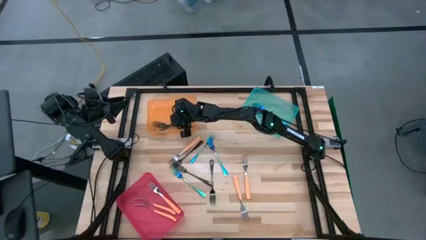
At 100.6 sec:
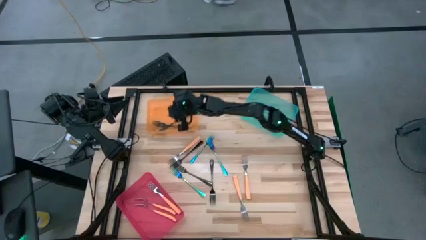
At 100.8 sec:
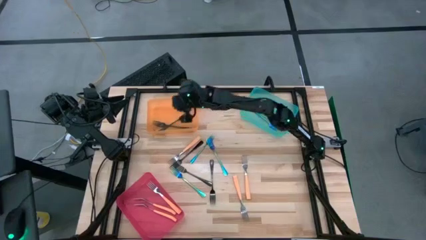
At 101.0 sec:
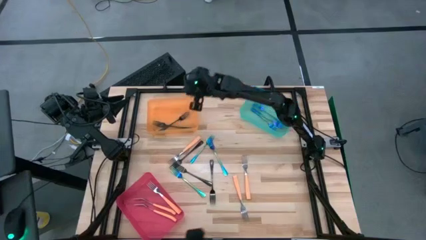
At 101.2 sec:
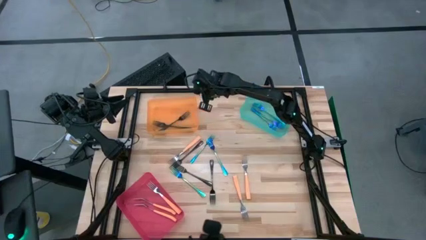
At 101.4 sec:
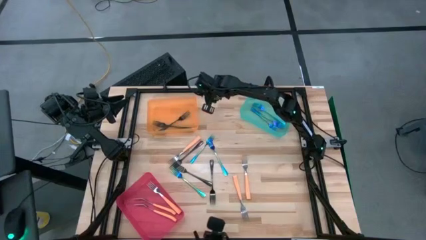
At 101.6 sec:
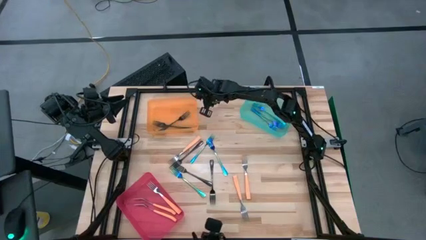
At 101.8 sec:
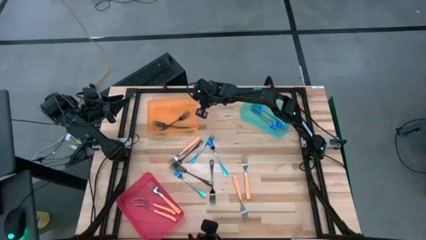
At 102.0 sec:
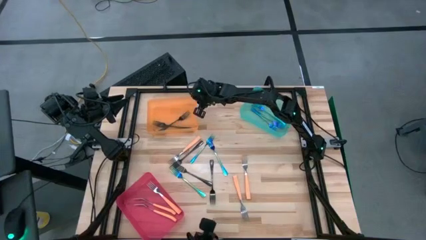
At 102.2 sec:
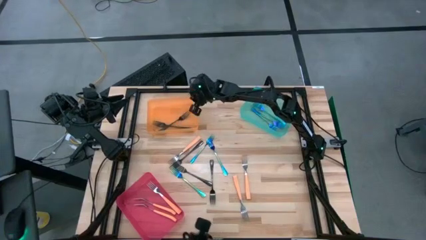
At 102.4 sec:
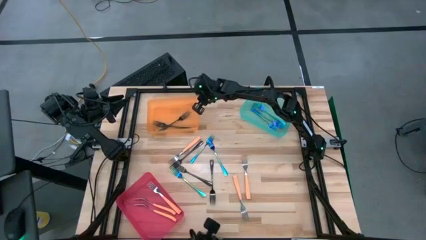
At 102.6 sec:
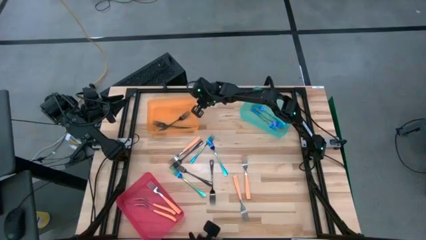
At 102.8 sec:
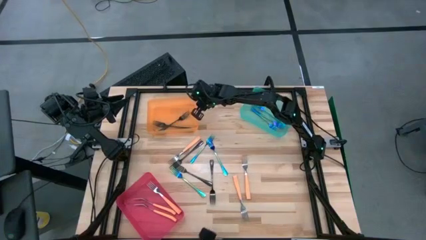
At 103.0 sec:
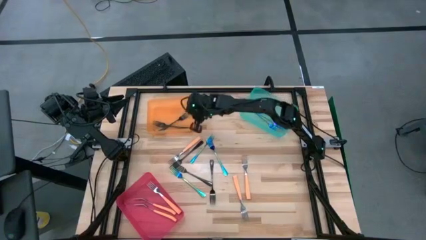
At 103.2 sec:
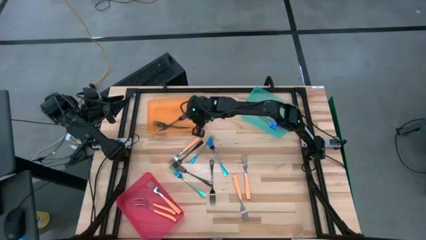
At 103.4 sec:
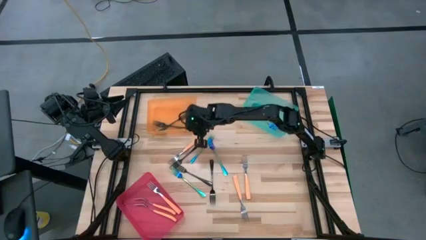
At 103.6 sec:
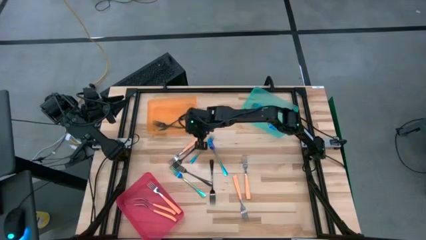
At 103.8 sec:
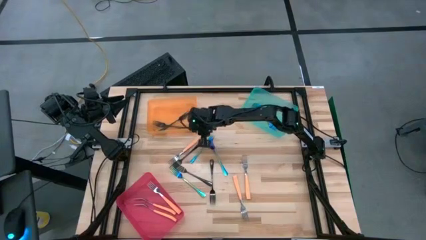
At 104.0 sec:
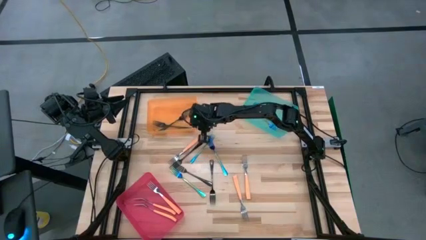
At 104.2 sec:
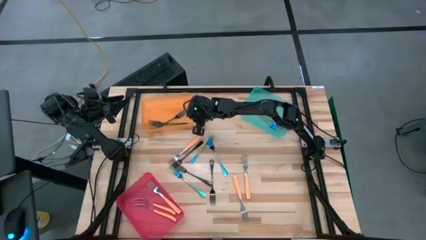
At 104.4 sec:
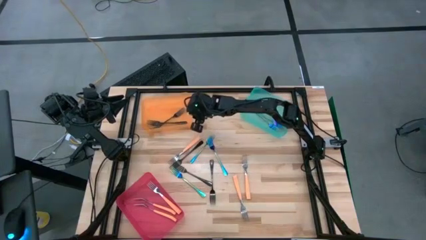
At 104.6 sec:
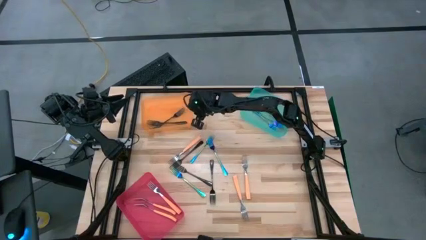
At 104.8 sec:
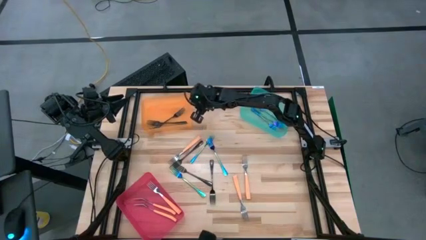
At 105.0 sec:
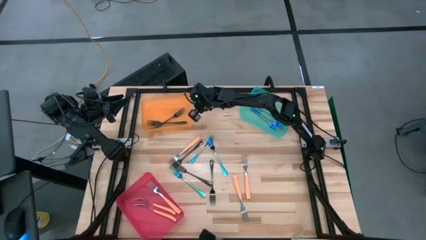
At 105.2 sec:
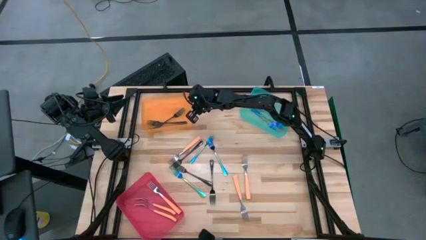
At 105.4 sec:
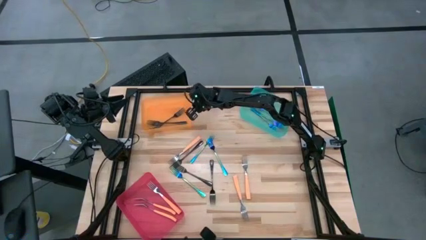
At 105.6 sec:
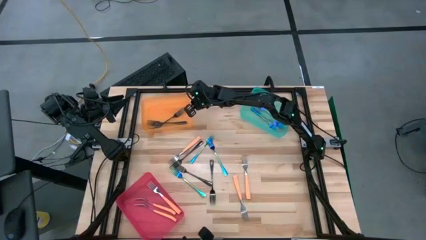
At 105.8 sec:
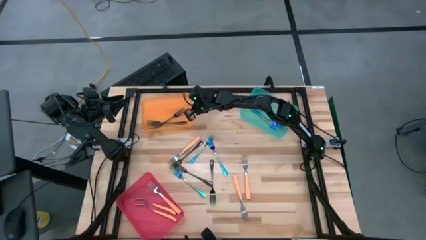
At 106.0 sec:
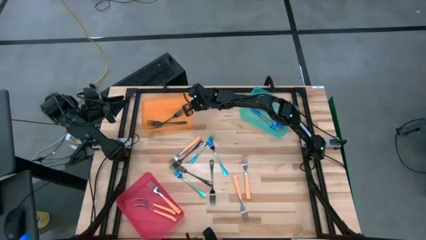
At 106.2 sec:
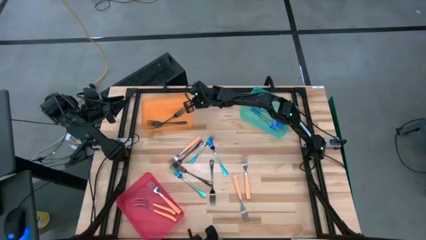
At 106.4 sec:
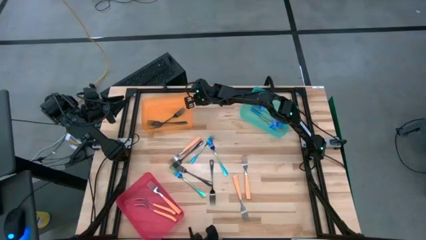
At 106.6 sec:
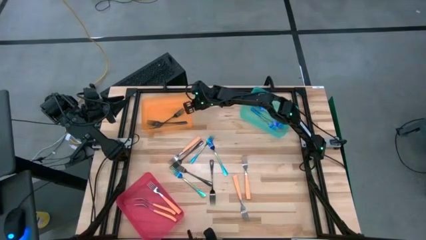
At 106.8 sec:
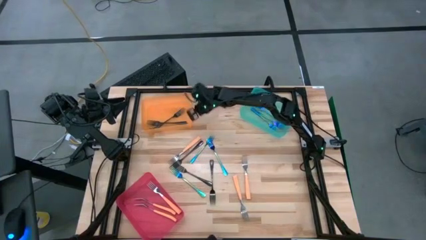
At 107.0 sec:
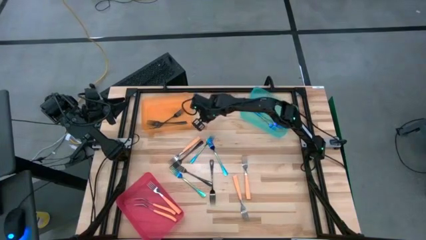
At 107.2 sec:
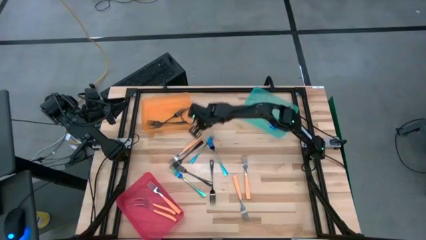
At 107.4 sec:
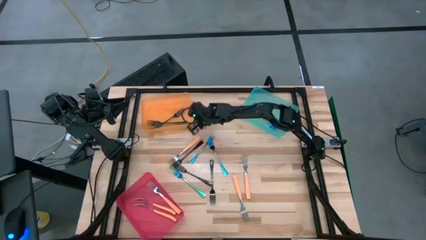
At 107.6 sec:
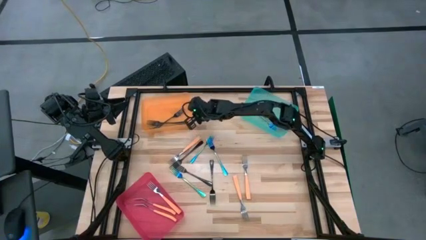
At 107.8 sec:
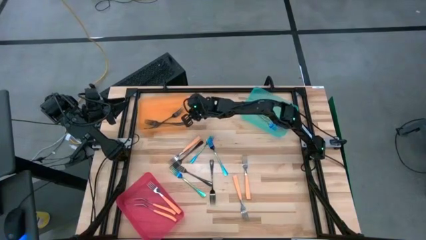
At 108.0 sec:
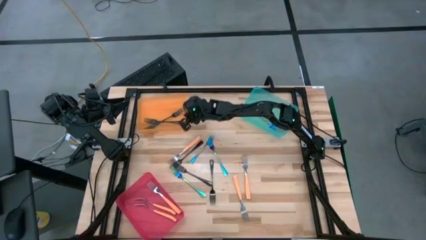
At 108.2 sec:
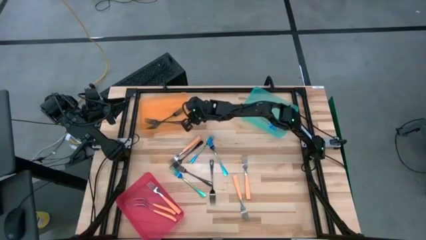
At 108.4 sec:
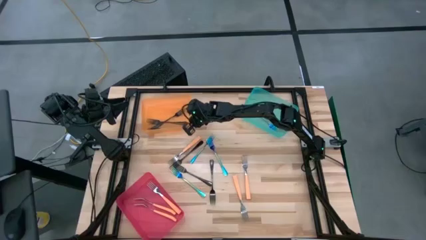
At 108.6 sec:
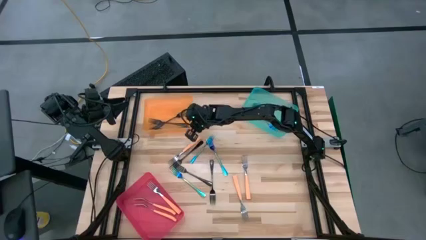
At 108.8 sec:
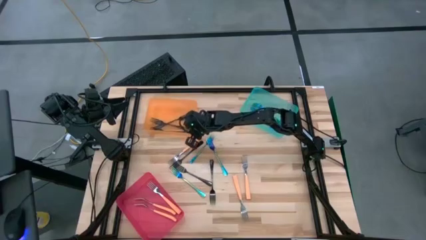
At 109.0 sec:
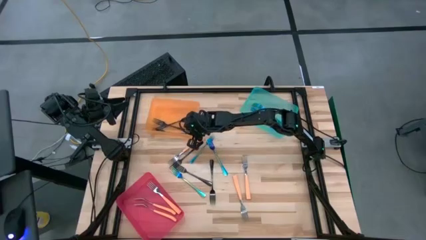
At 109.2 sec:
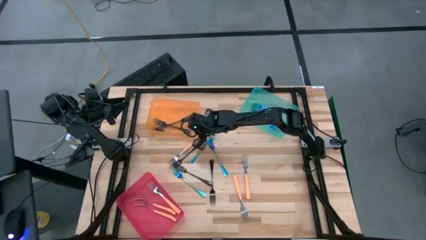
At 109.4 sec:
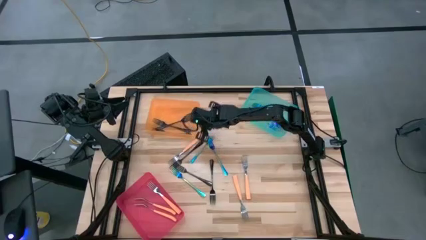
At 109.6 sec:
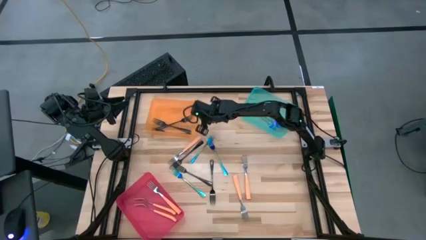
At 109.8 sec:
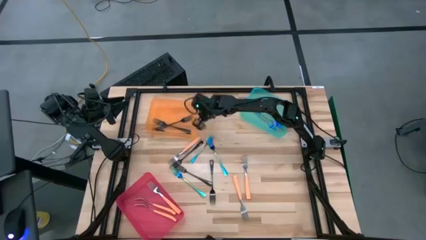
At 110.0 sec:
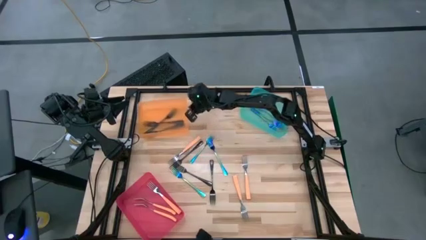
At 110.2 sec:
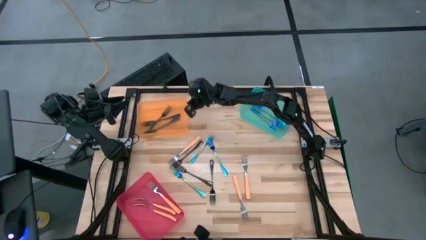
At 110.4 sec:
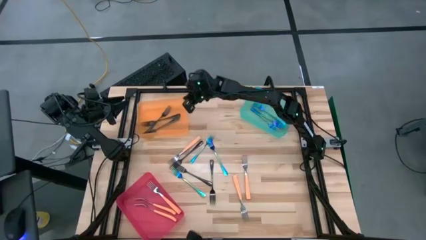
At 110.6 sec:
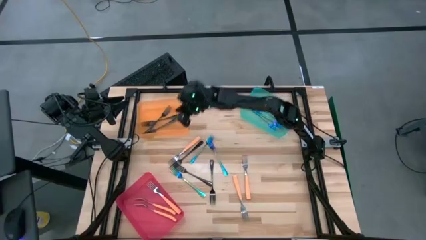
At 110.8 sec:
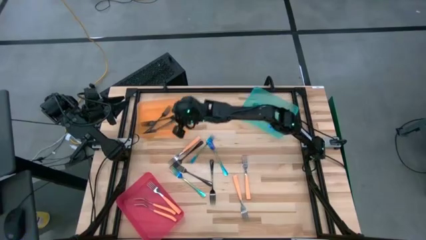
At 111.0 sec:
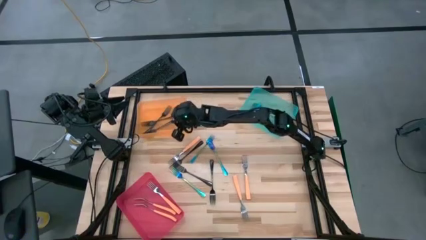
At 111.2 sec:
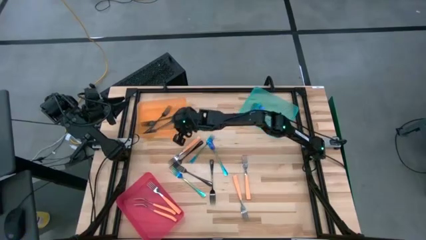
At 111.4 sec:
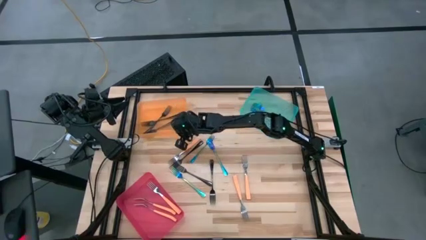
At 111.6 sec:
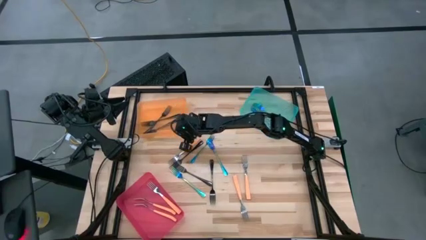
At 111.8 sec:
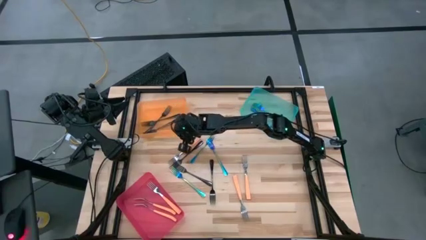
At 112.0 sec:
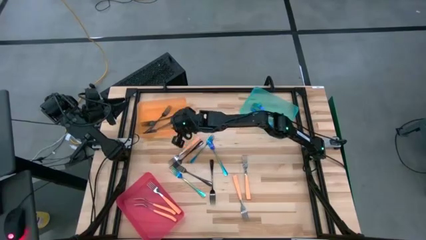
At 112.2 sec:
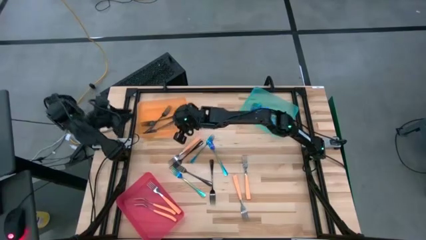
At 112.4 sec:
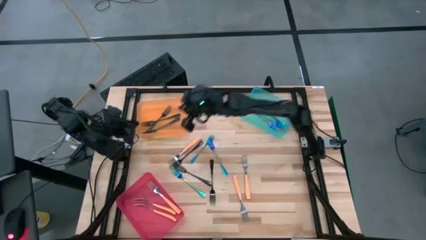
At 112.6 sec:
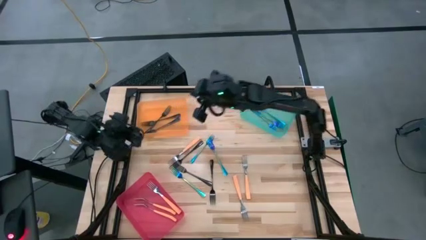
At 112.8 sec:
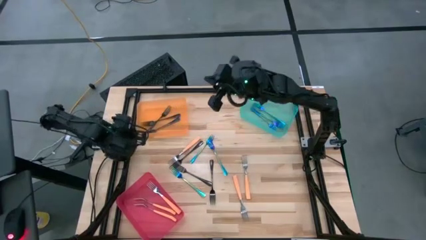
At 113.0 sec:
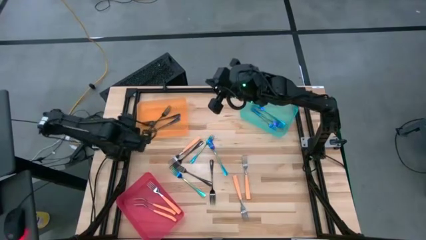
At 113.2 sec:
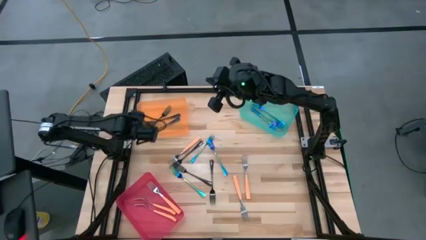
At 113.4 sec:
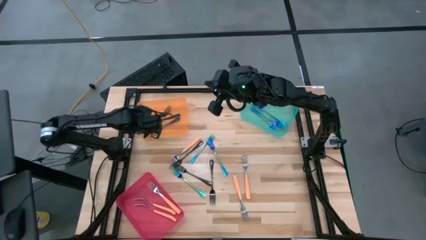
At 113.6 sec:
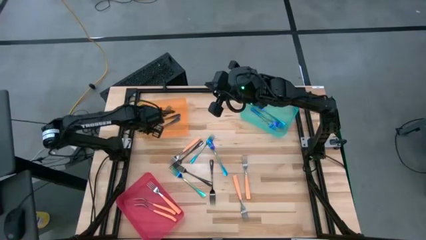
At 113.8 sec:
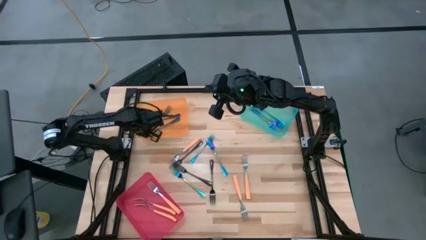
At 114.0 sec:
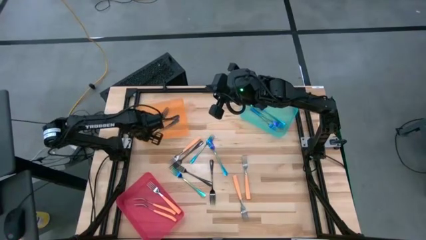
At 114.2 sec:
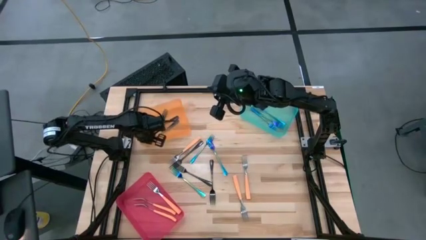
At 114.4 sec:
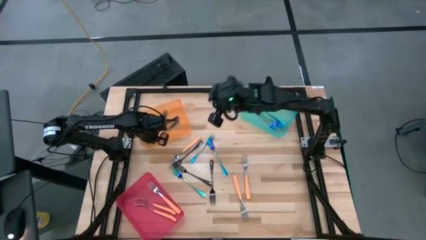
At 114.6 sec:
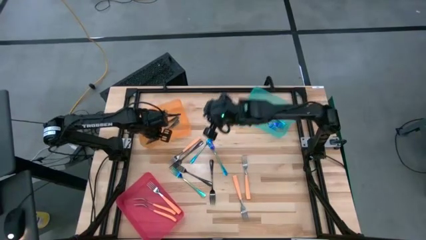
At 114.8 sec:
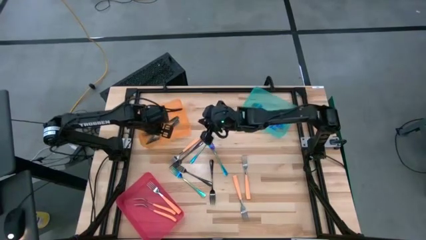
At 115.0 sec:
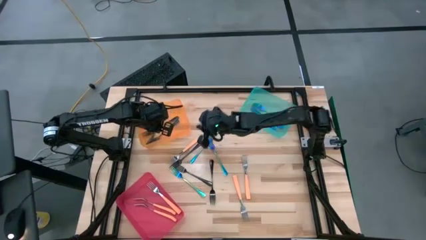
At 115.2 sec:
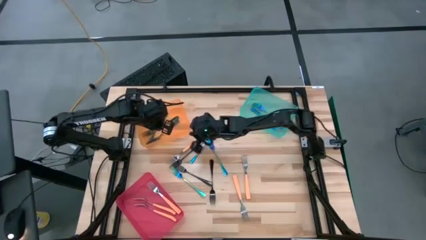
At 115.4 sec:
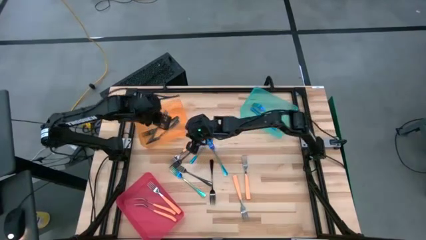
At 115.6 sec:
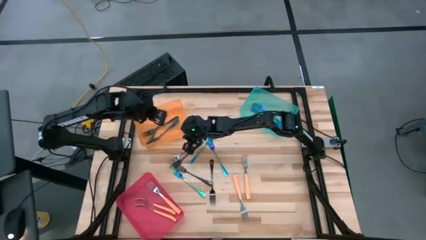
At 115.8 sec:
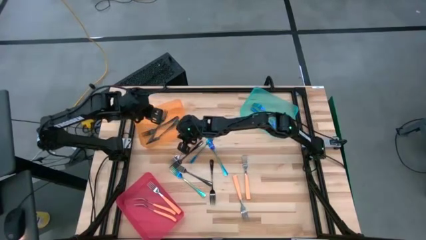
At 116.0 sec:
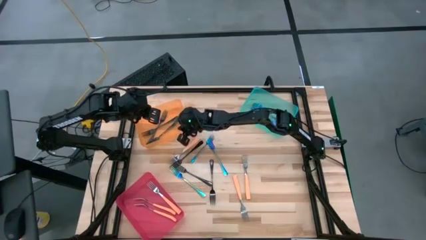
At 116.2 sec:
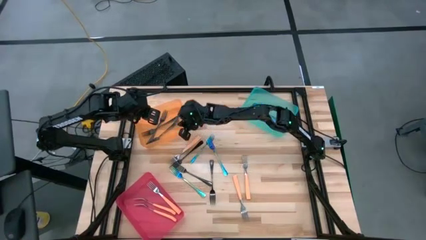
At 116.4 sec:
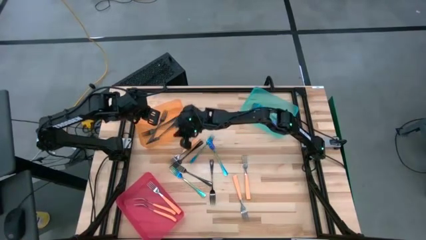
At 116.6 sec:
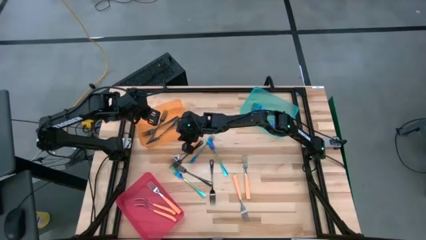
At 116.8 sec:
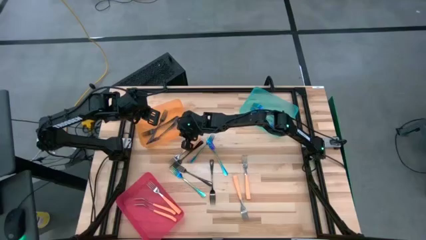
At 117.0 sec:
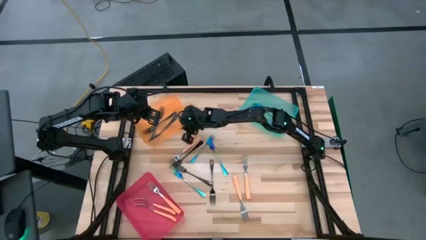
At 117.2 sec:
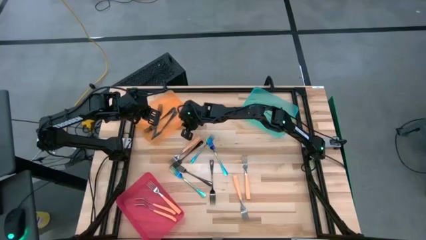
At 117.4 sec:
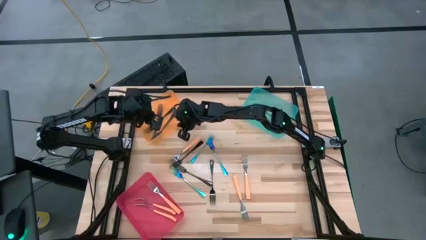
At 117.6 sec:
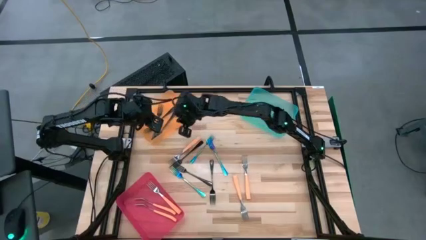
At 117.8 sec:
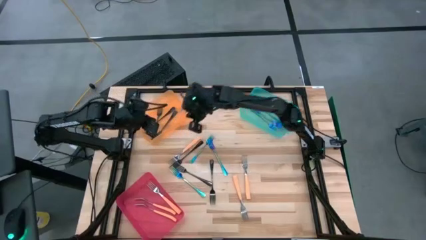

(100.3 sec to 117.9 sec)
Task: Sort silverware by color (type)
Adjust the orange bin
